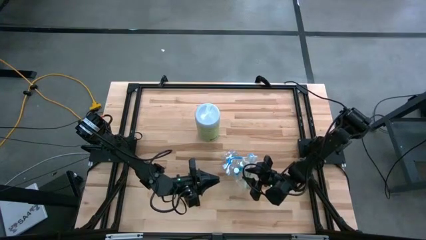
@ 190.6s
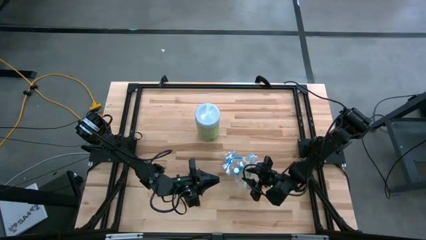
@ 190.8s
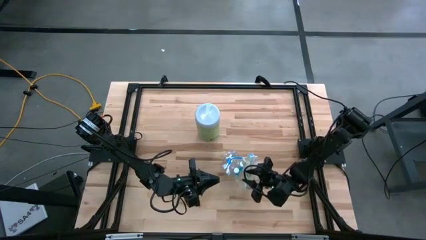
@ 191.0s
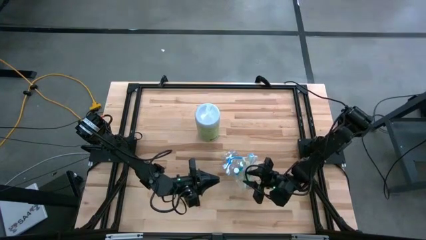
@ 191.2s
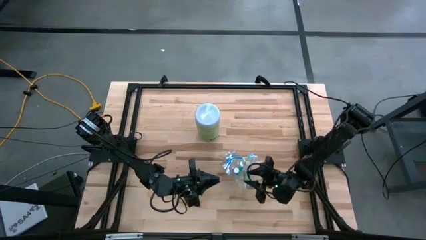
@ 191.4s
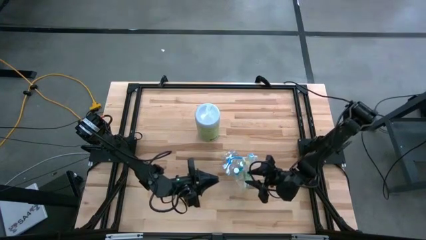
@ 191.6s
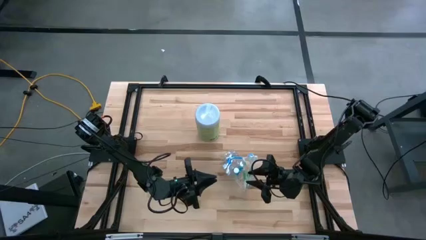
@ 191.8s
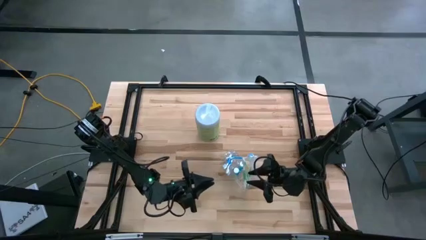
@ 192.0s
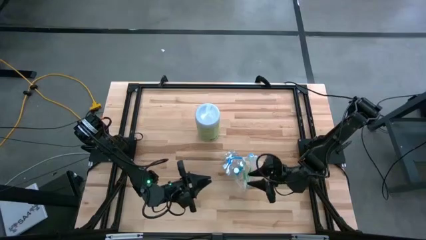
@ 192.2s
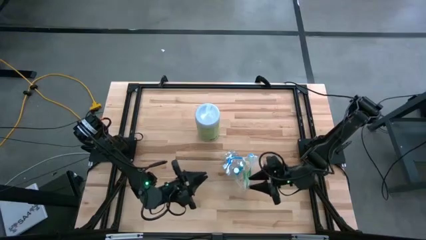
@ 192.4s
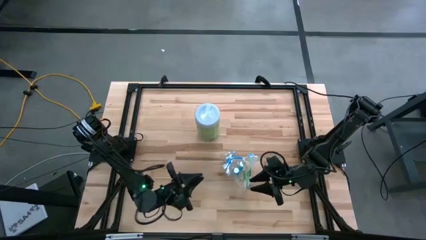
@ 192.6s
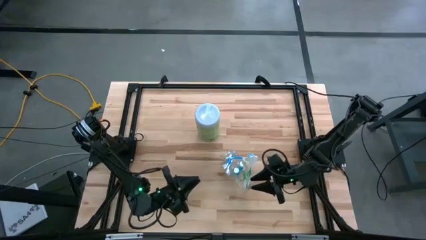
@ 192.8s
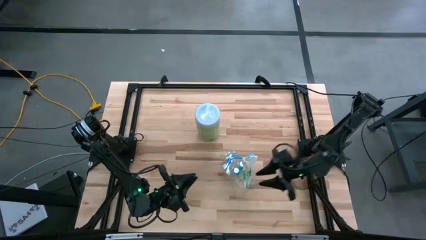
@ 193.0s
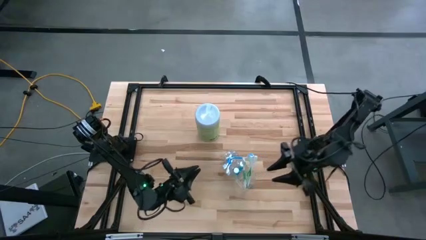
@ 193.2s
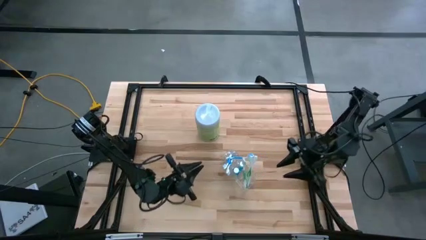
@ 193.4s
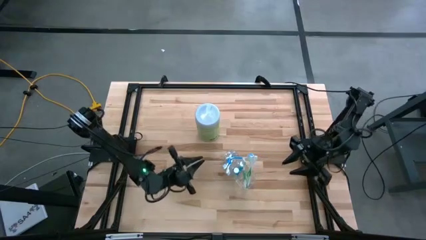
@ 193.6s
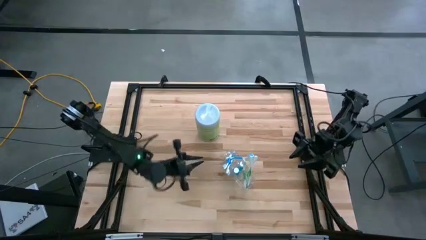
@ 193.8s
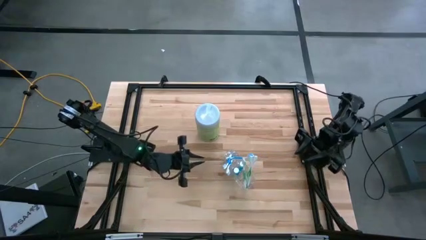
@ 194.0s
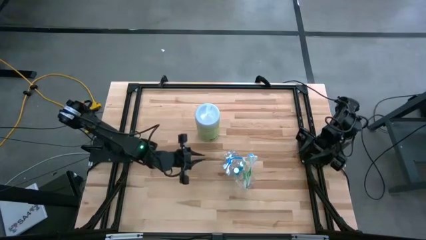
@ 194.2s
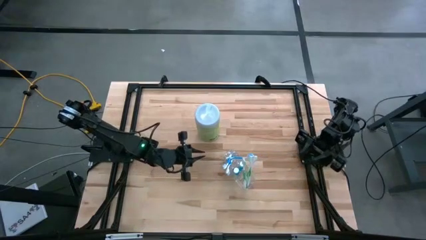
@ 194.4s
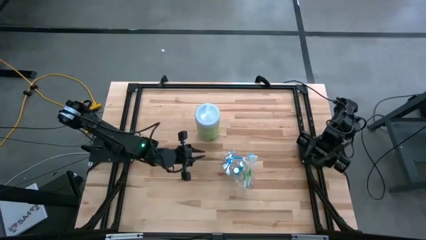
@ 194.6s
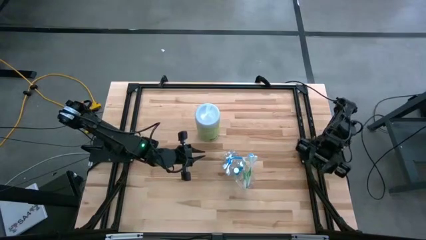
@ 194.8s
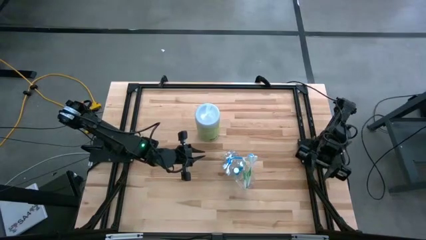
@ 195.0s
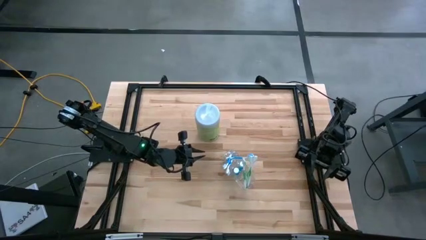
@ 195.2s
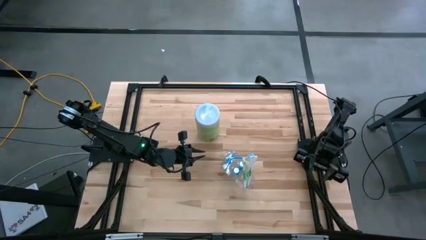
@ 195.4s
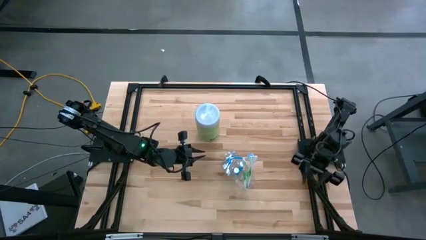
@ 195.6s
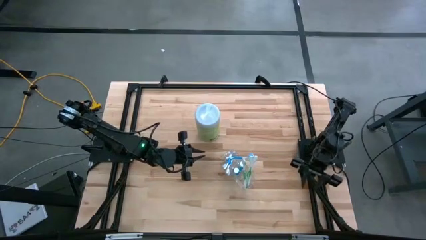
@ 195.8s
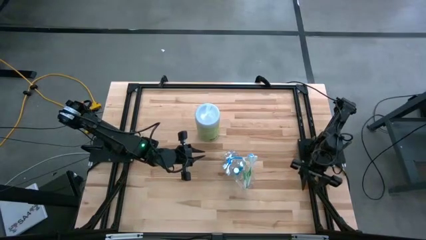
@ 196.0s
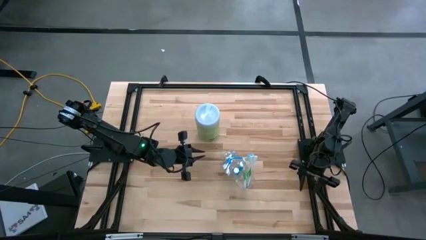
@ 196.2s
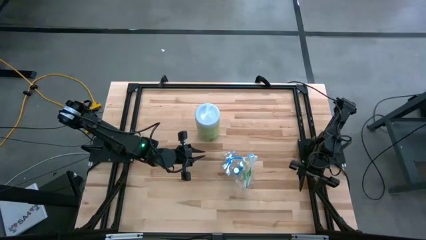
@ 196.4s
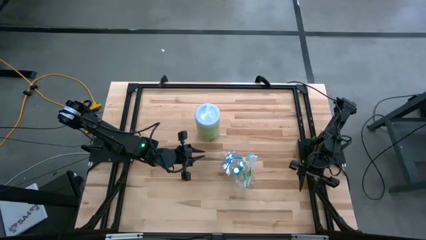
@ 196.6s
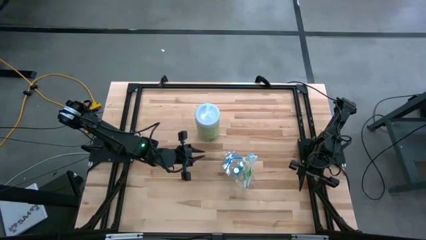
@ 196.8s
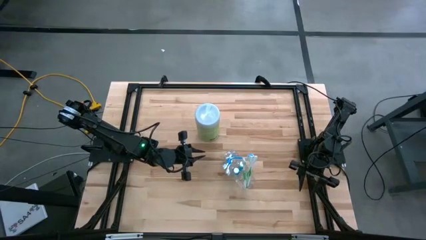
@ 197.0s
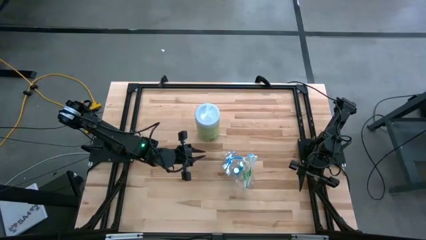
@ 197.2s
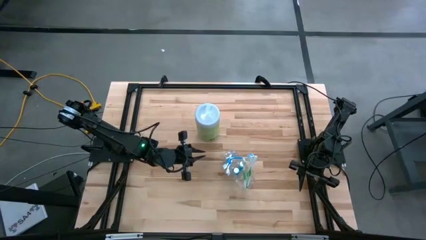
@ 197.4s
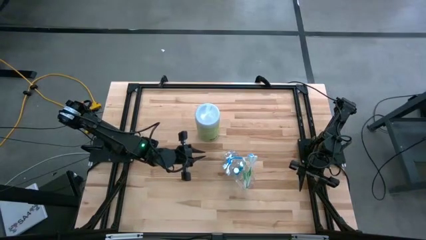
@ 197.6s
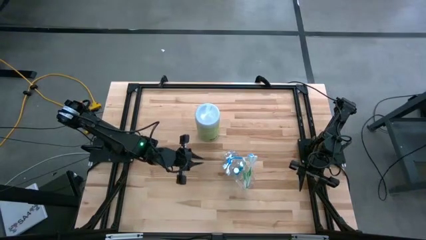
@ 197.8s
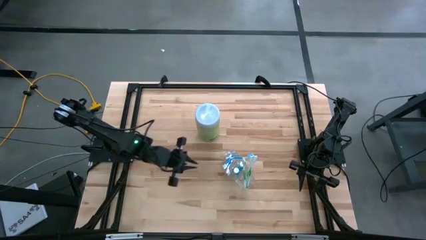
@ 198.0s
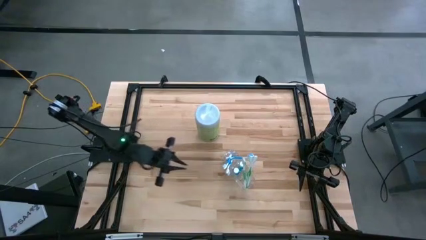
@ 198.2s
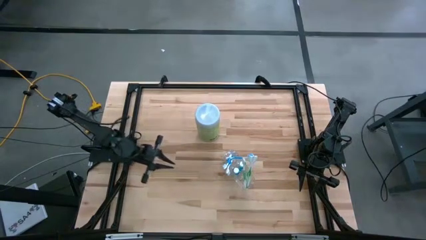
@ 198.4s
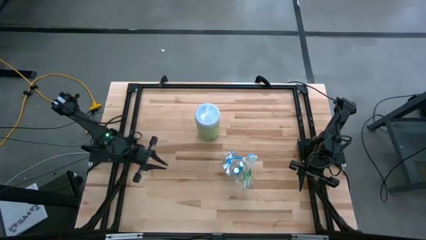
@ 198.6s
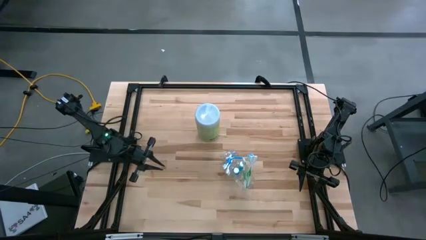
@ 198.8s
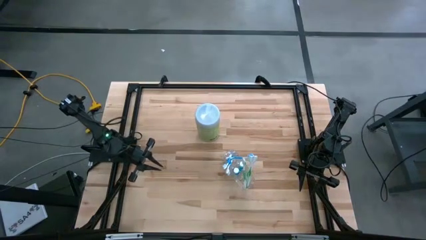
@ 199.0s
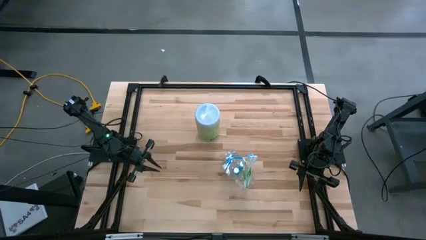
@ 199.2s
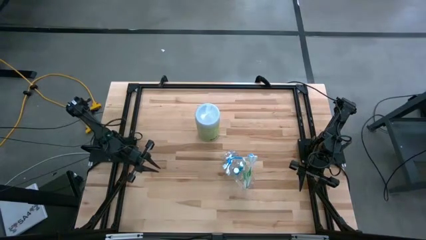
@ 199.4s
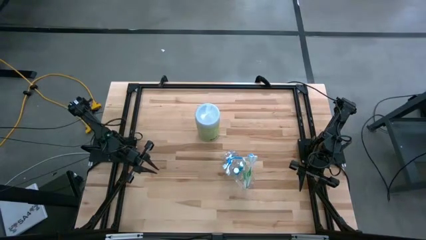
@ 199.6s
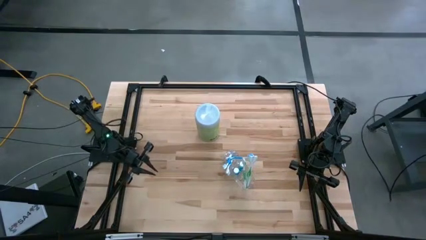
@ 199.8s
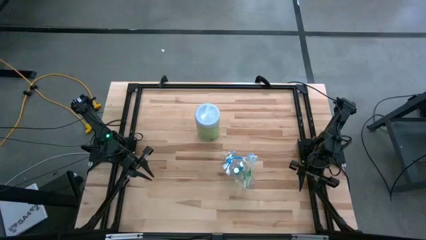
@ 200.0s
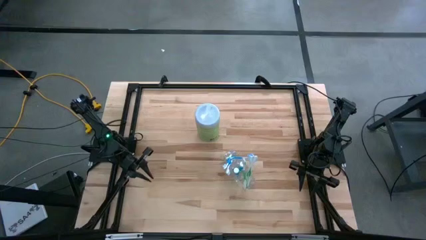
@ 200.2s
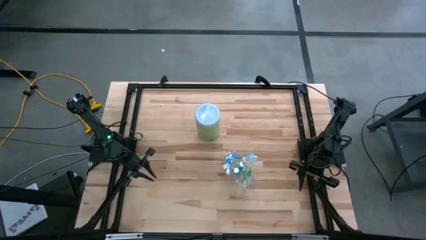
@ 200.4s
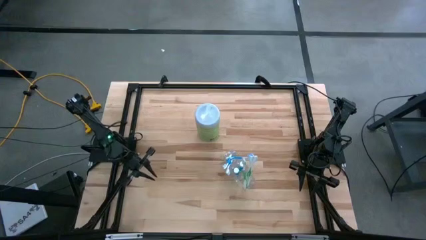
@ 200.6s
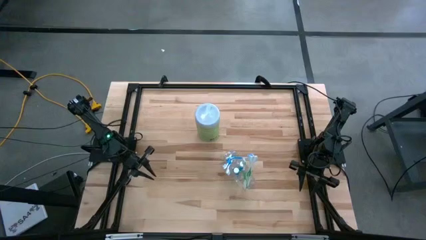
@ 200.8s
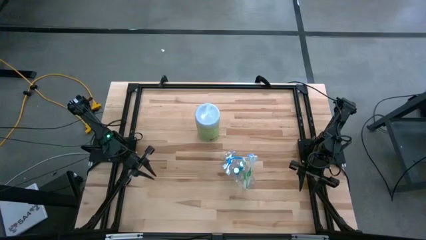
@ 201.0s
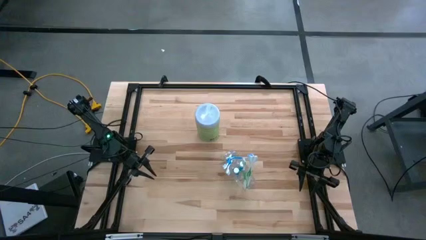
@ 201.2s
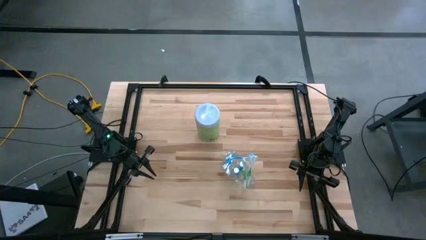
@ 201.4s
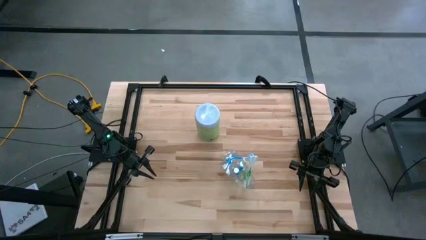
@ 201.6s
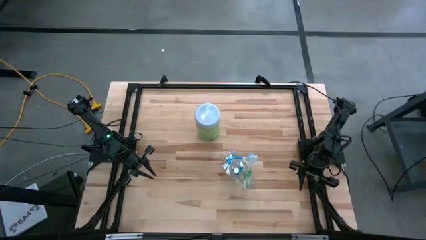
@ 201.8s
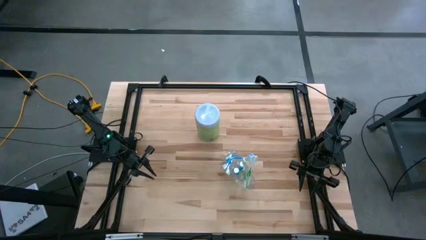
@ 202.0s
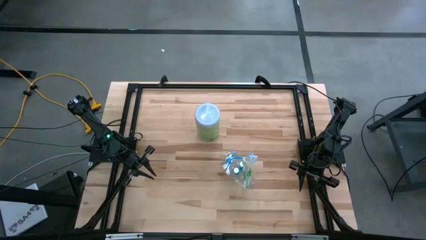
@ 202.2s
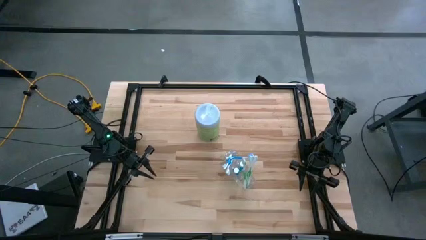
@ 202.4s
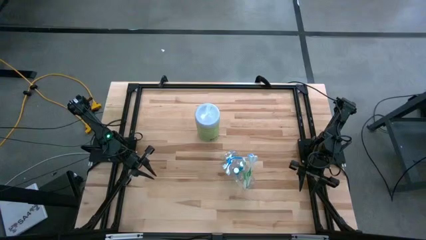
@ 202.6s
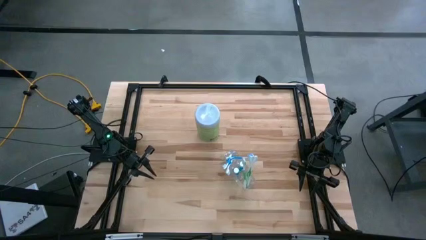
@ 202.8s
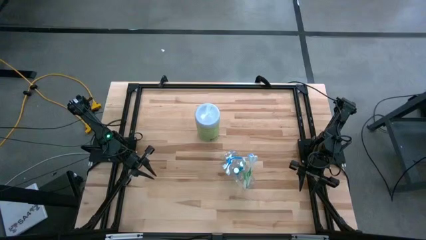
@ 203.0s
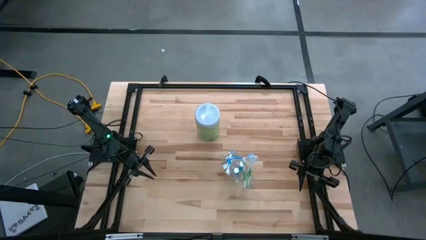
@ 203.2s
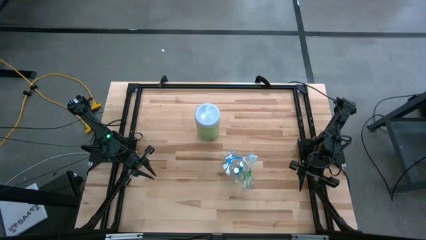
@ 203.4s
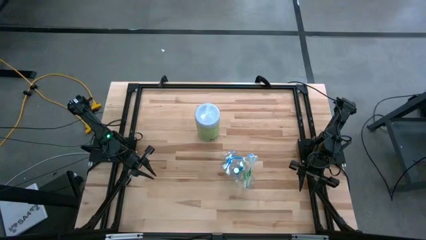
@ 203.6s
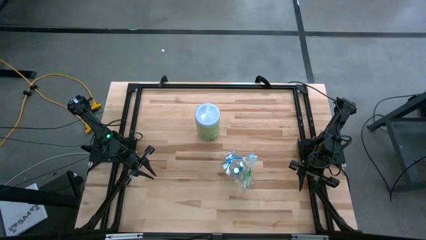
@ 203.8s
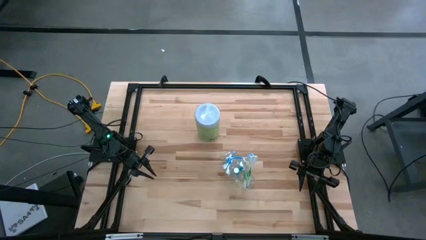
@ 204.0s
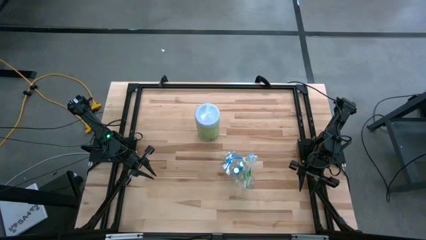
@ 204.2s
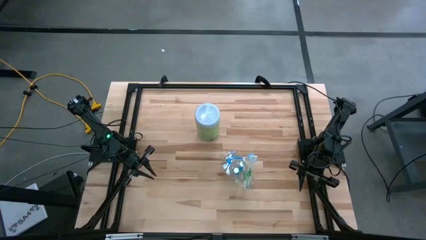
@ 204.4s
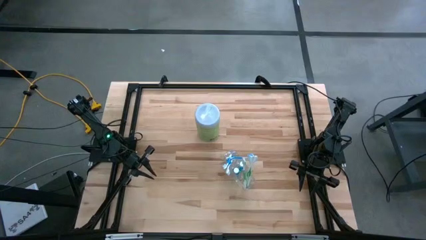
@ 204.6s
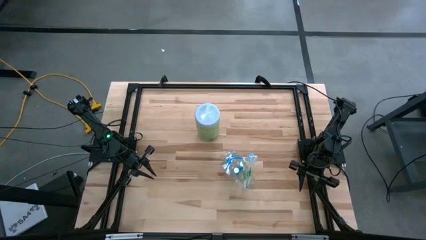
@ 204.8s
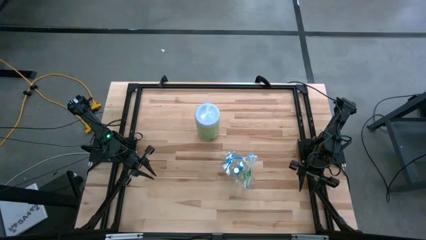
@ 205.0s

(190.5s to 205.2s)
Task: Pick & Place toothbrushing station
Return to Home Position

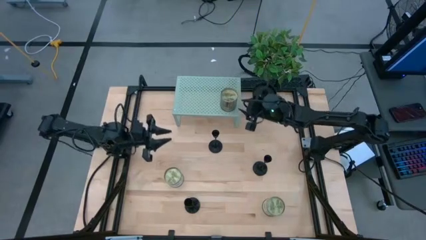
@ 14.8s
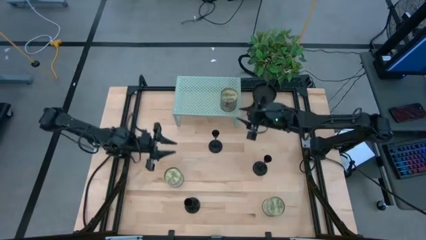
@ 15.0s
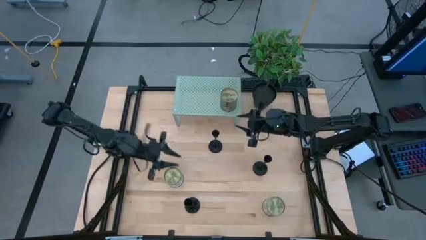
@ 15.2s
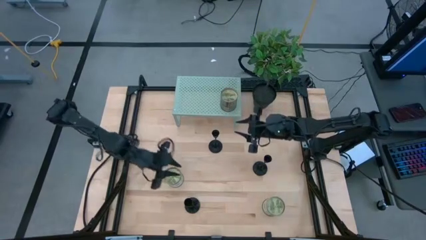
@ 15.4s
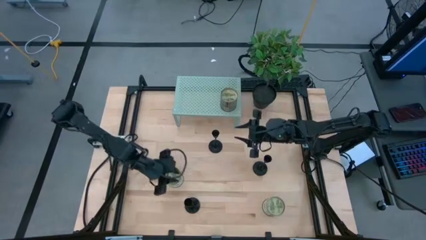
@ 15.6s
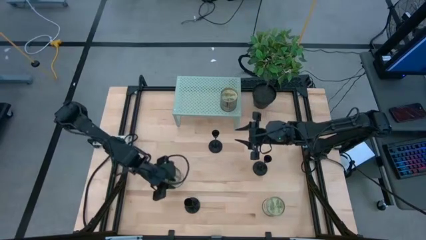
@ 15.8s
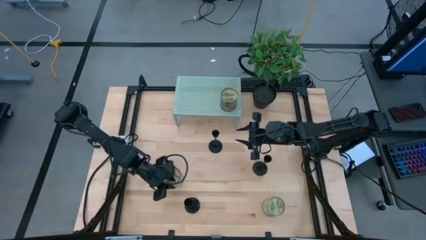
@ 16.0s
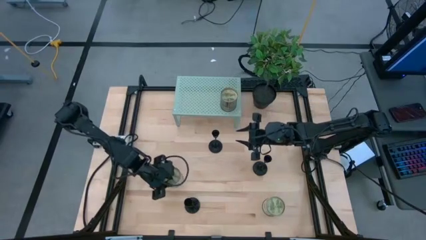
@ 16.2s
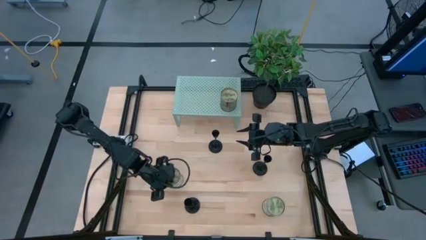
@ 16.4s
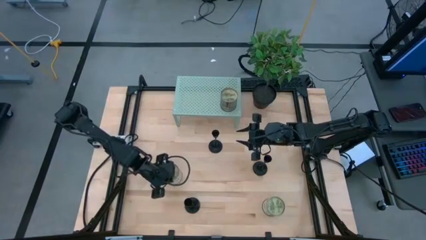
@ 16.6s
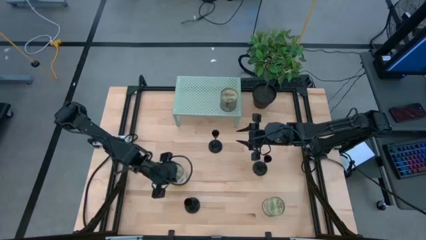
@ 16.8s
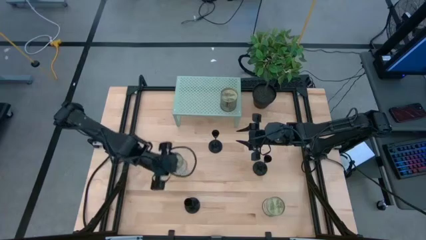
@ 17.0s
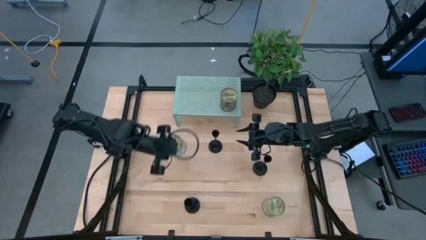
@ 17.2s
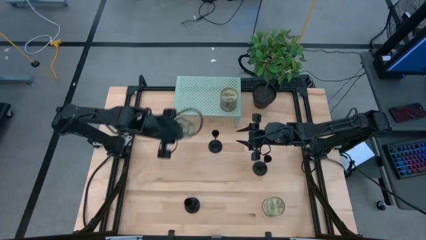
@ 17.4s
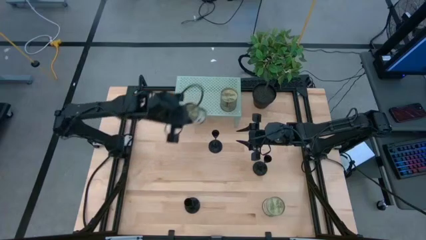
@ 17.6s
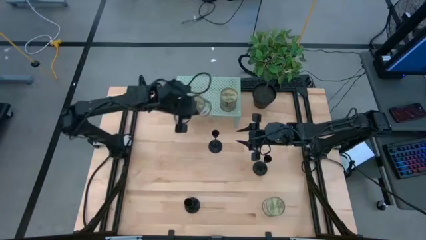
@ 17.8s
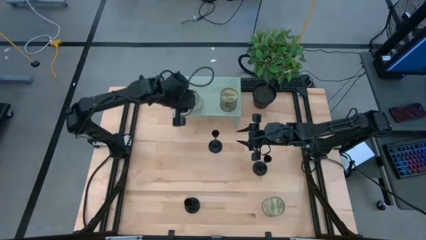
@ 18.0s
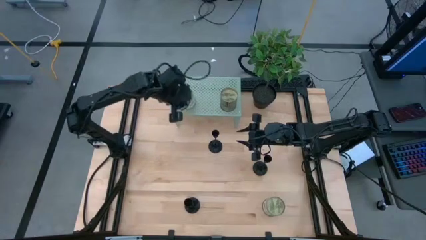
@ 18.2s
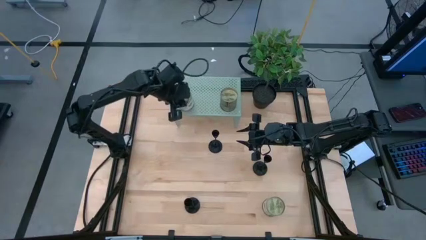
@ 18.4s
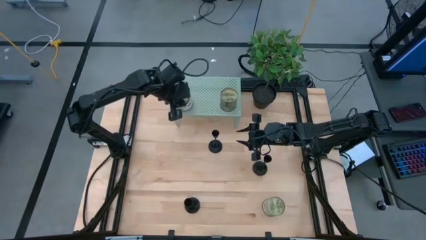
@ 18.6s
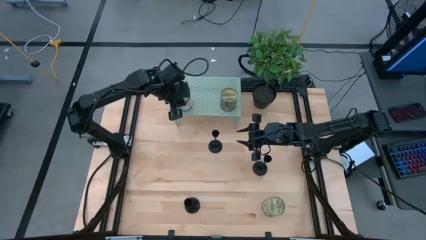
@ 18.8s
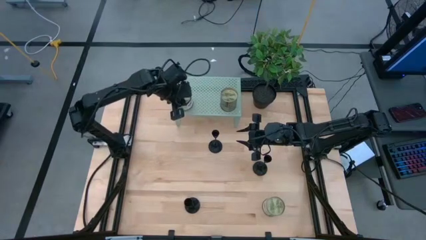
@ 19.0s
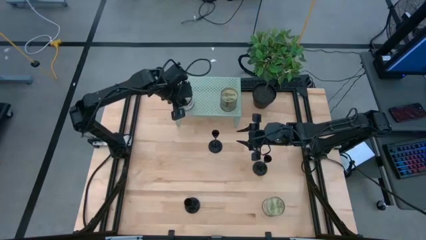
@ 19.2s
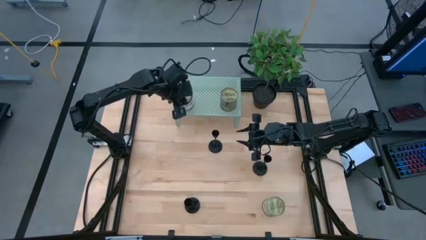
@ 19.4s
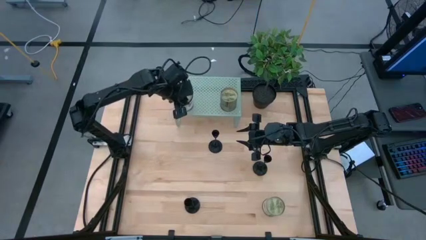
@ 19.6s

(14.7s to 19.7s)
Task: Pick & Place candle stick holders
Put the left jar candle on the shelf
